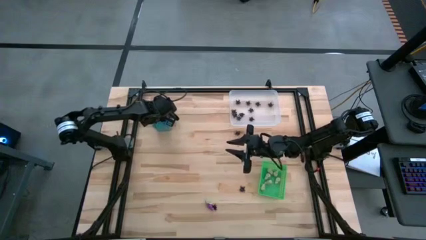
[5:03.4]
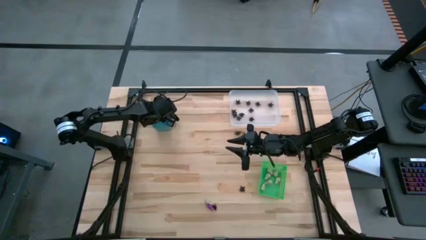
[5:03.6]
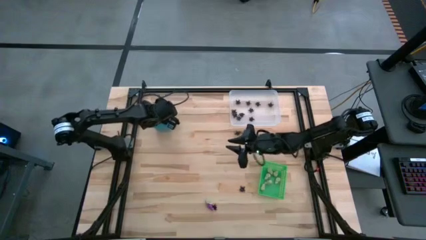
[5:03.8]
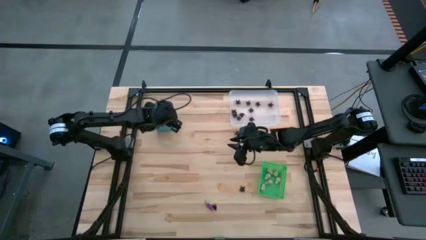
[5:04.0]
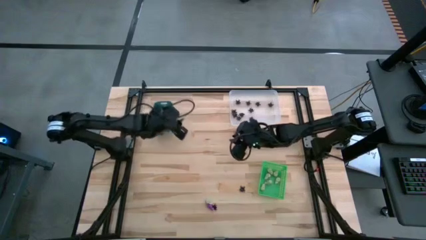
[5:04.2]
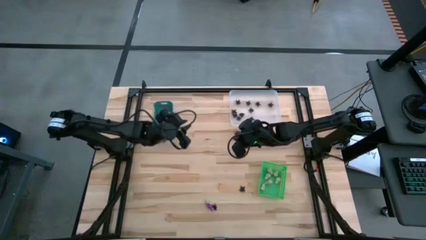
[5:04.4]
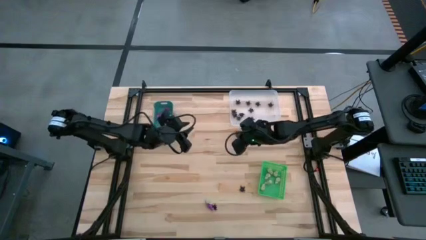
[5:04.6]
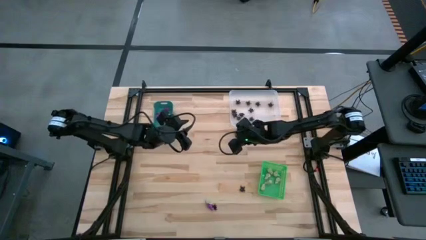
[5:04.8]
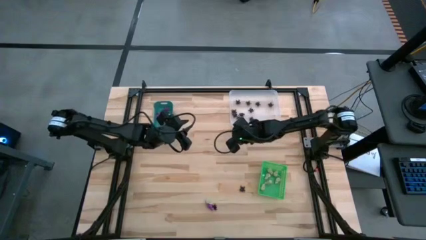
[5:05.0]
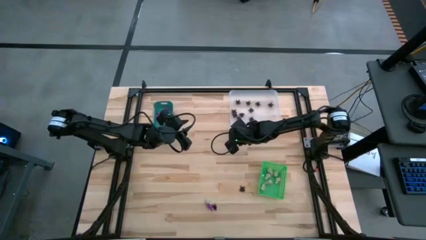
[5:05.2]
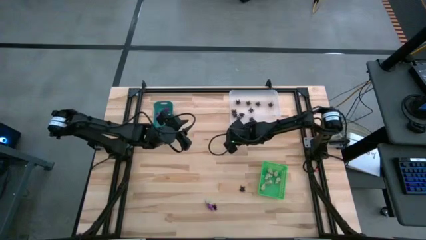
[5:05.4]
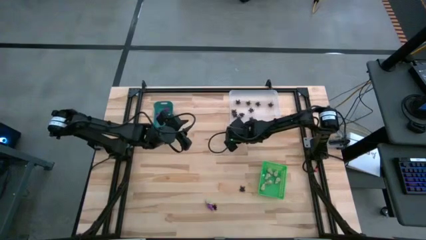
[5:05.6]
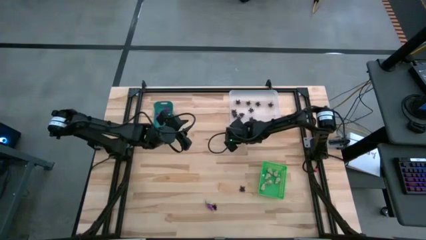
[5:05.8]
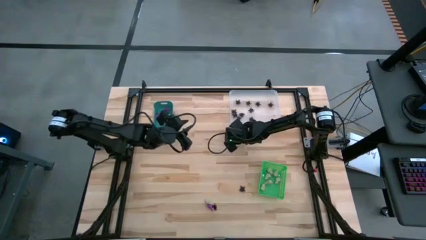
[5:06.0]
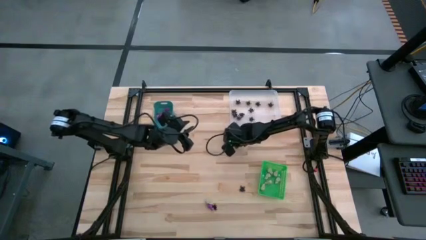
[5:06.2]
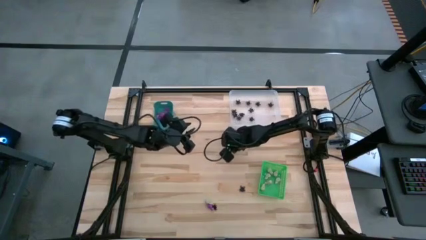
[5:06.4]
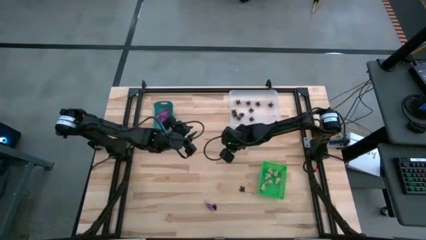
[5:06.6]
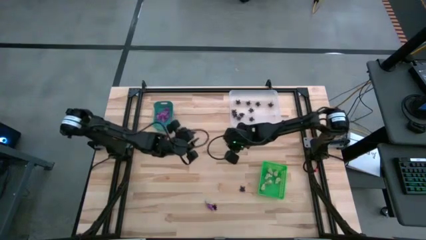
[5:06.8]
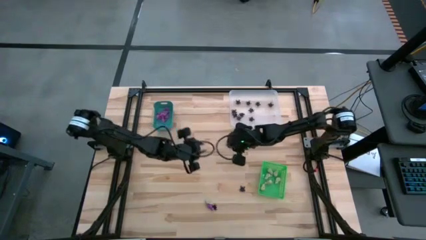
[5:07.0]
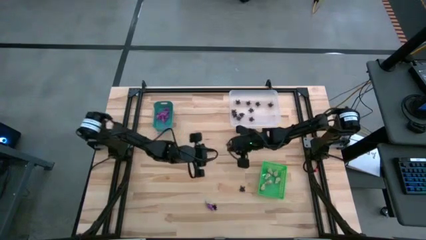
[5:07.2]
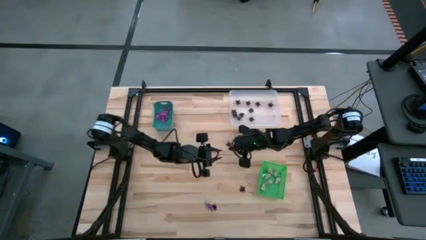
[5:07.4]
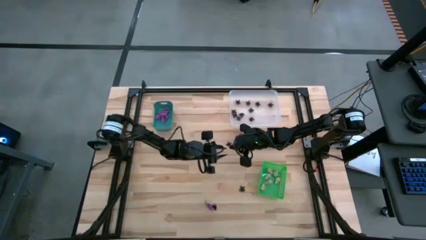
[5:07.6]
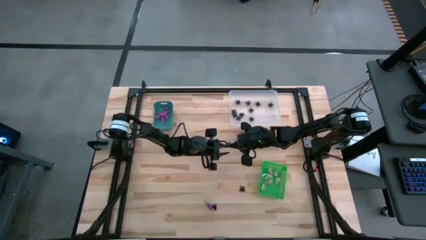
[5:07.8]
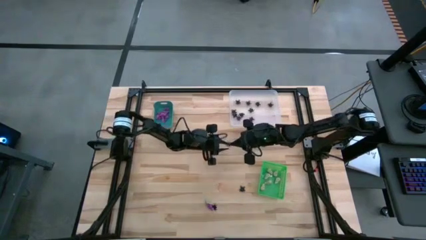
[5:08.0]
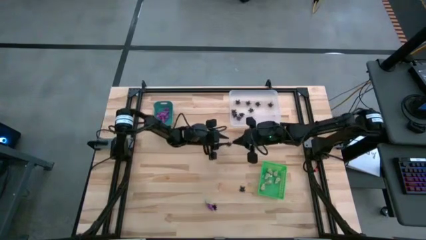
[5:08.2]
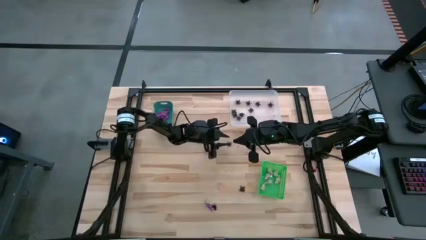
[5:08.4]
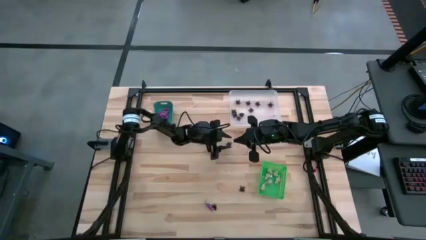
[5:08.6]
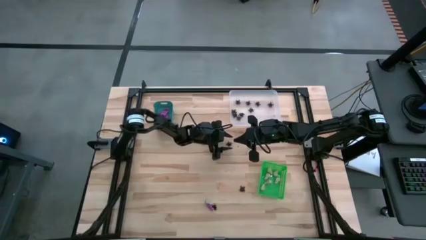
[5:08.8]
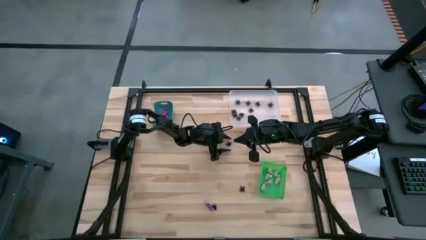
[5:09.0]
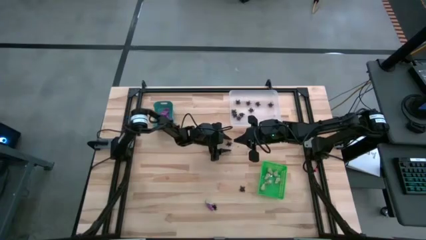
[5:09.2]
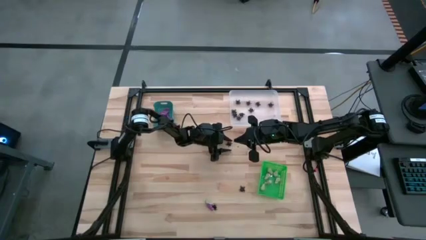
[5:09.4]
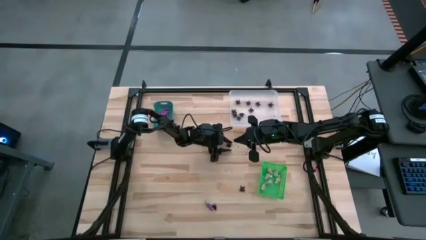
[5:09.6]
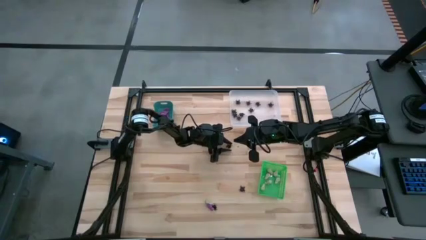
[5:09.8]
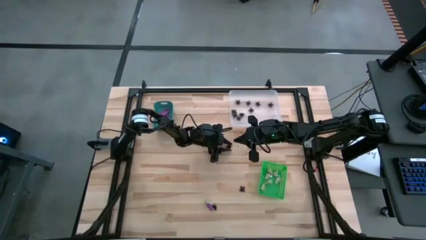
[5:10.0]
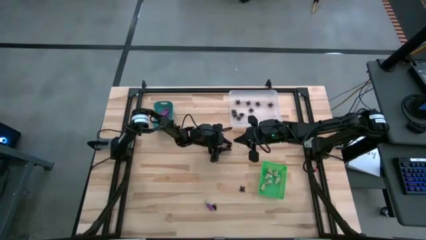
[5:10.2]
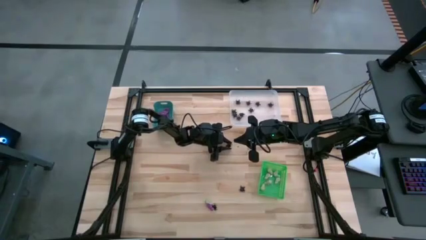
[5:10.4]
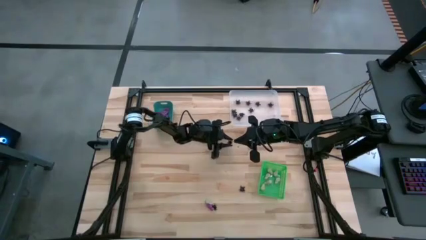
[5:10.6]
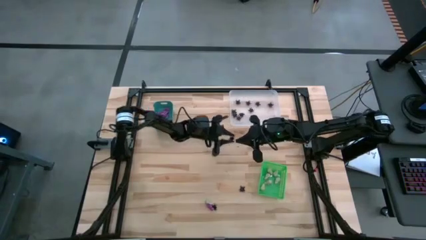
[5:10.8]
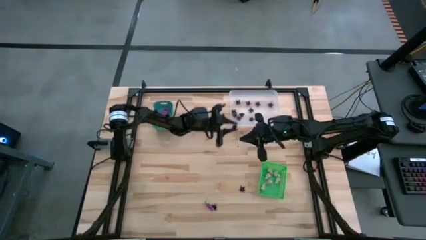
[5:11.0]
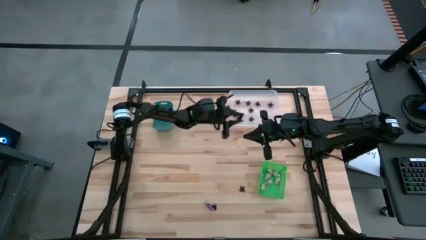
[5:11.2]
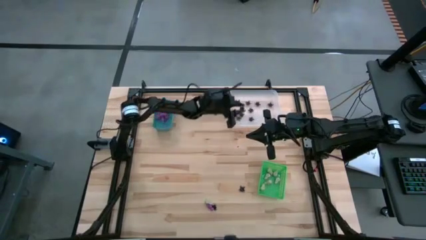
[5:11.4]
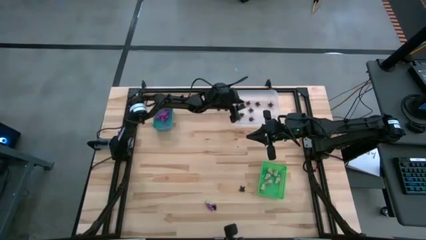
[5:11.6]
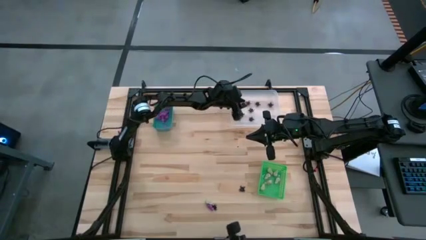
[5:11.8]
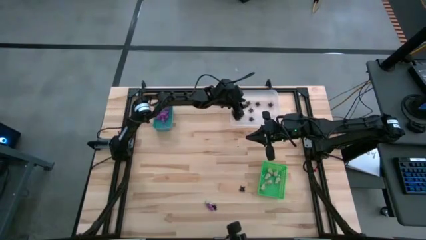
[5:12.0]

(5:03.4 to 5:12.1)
Task: Sort Halloween decoration
Put the black spider toy into the white bin

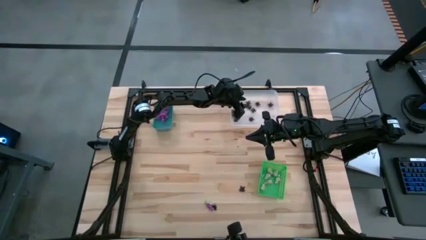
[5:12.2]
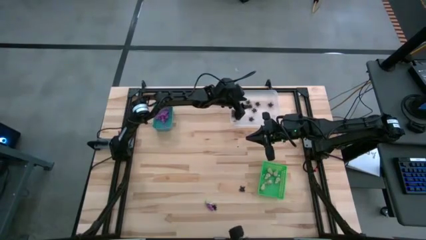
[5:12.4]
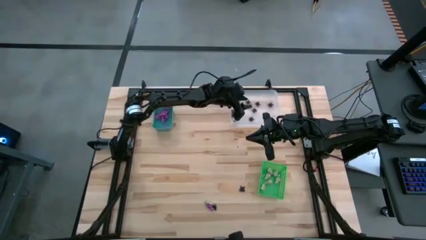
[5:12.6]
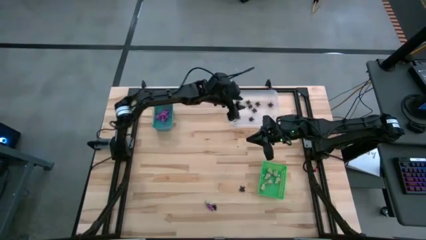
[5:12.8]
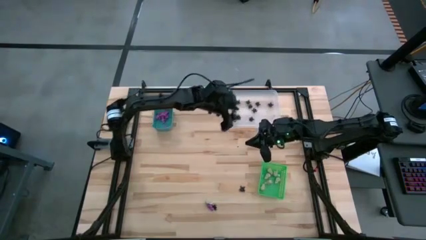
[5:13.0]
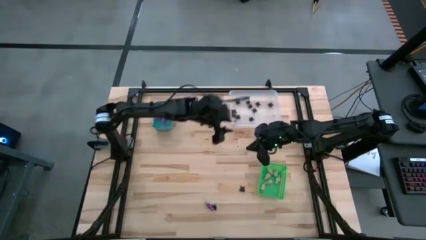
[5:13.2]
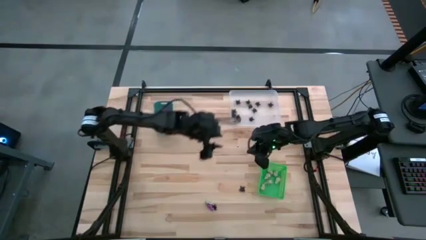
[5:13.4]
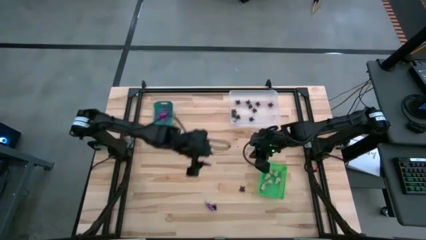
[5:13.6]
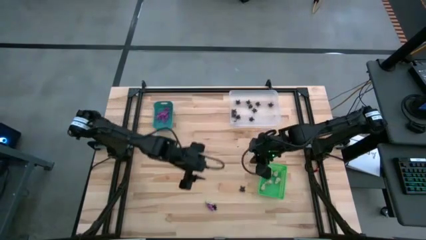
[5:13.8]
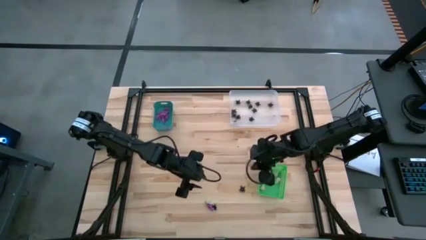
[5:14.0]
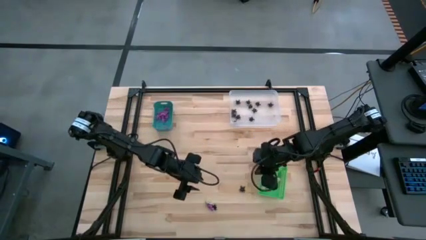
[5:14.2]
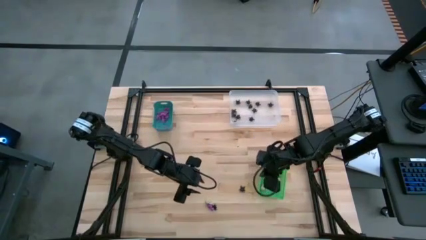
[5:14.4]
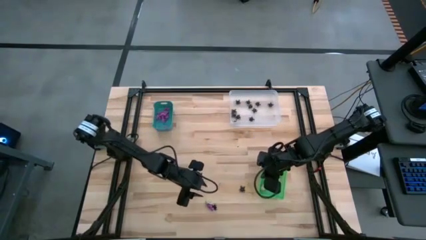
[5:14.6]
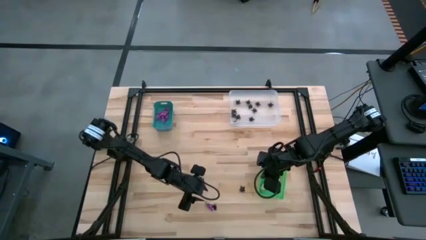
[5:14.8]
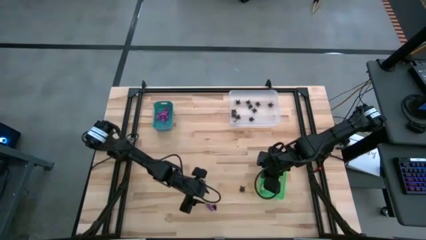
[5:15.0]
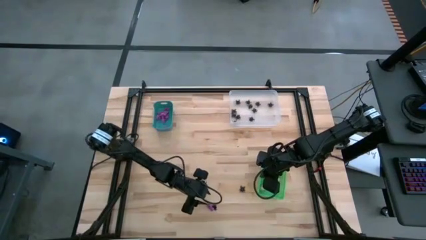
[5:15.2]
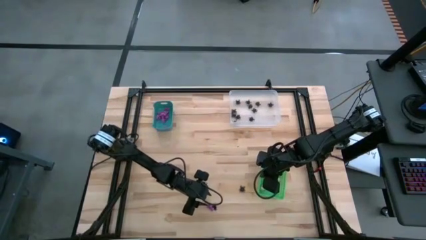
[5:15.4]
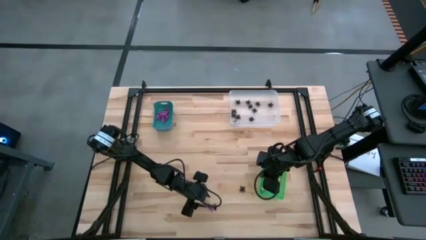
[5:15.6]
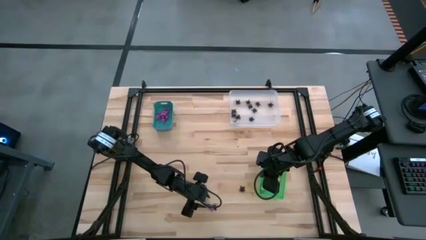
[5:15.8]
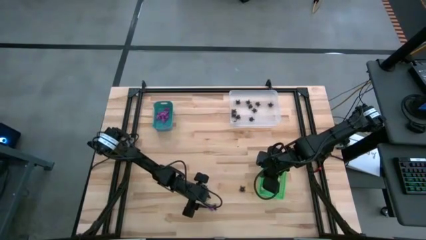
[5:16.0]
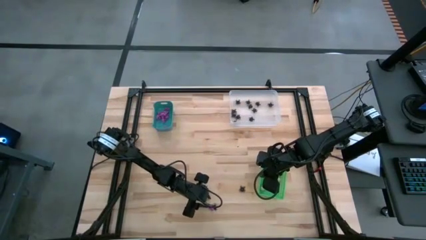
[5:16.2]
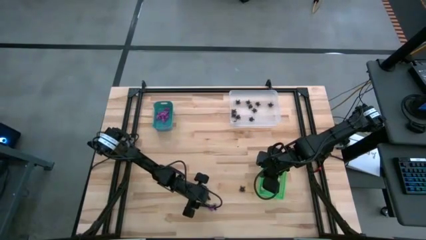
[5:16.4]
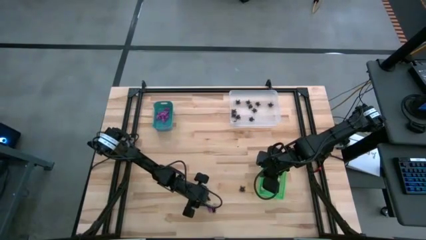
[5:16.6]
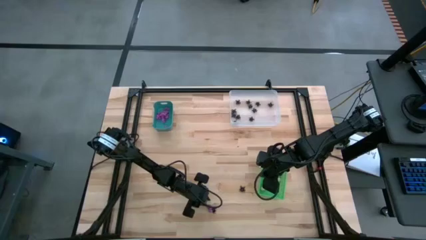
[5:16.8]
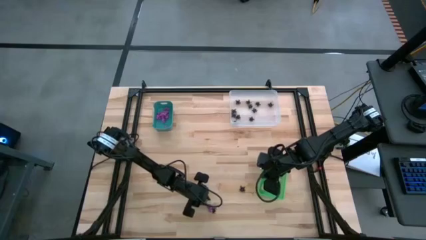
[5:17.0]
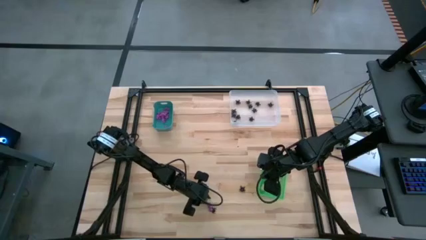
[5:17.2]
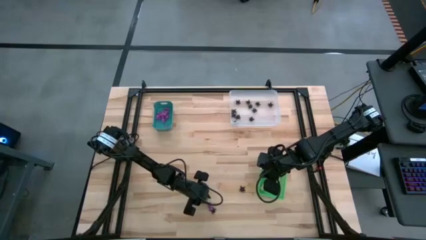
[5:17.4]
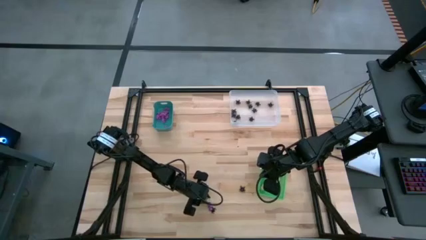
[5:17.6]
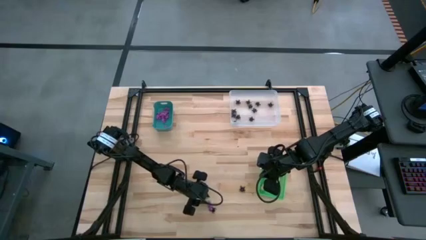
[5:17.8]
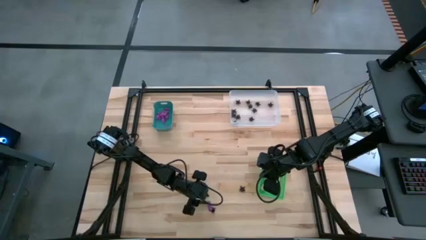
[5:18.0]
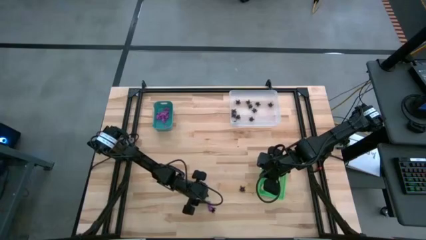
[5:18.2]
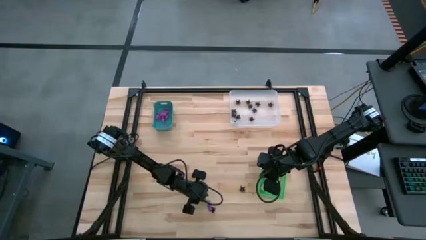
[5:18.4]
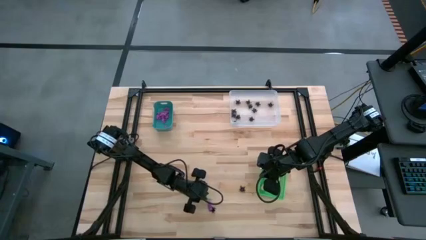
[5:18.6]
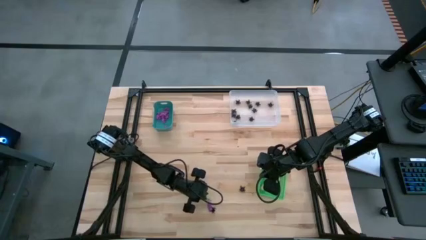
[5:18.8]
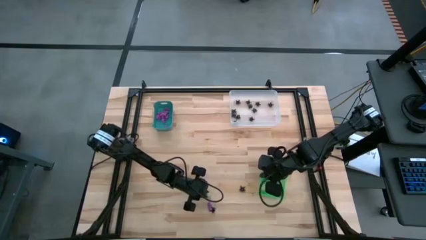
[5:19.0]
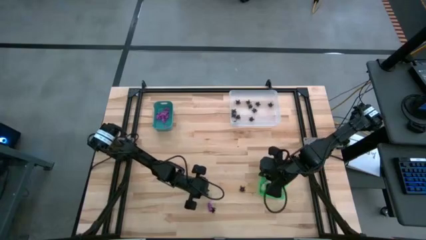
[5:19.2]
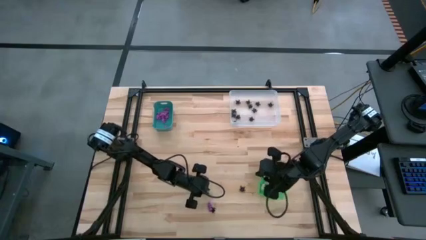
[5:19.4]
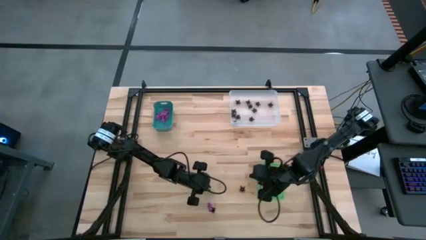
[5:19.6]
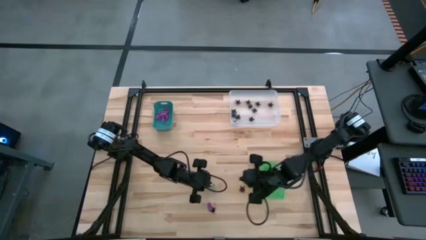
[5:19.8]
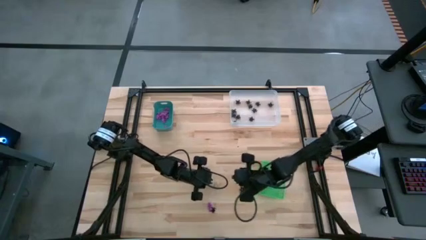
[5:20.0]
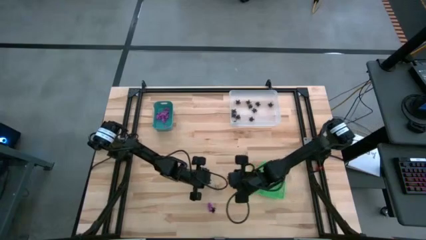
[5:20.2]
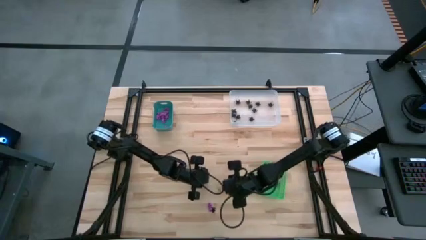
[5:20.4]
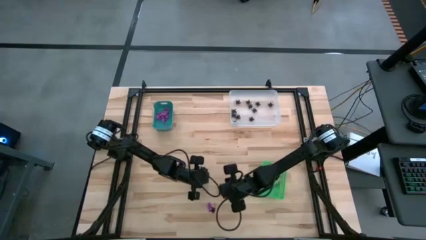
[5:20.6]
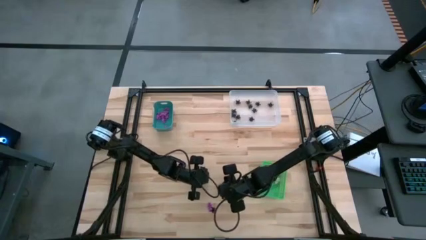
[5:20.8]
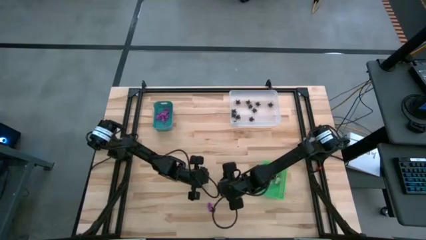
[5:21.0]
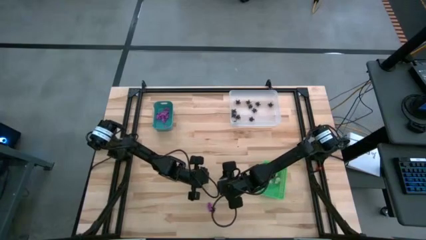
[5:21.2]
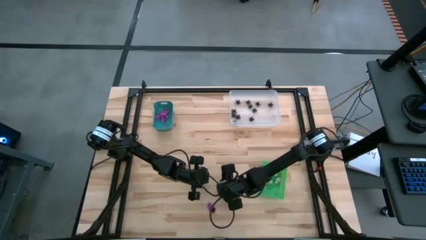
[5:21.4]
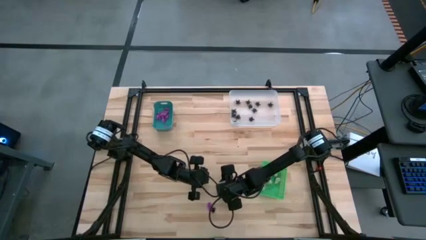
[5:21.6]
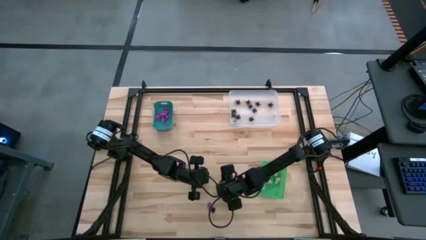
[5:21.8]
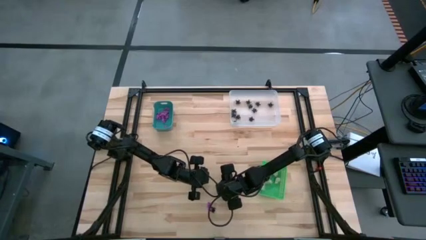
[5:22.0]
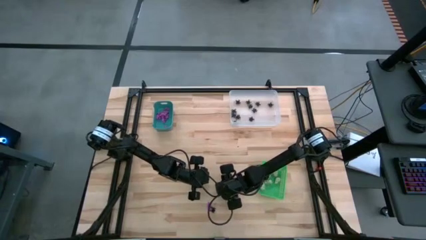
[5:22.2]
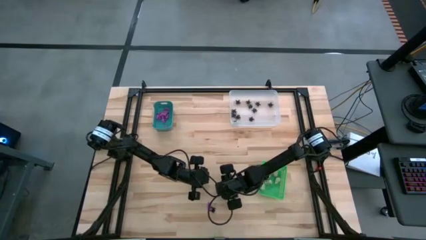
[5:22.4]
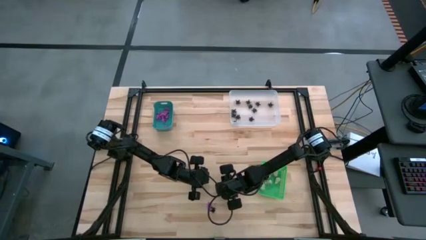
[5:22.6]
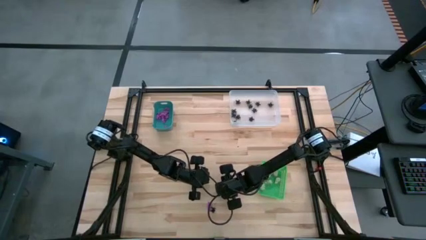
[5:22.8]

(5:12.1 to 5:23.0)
Put the white skull toy into the green bin
